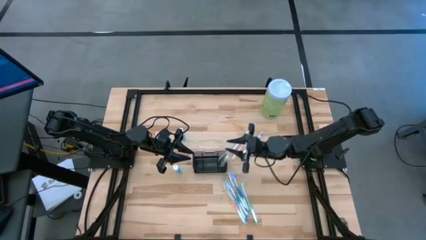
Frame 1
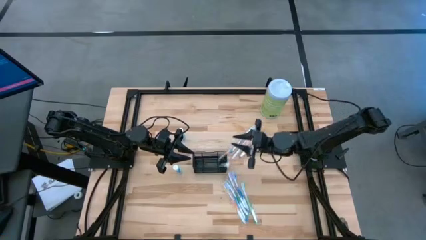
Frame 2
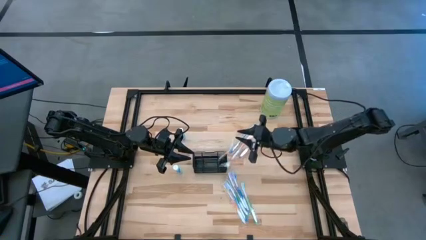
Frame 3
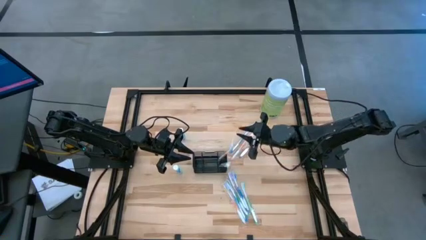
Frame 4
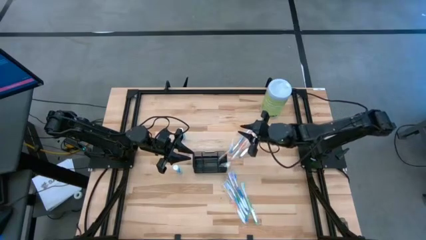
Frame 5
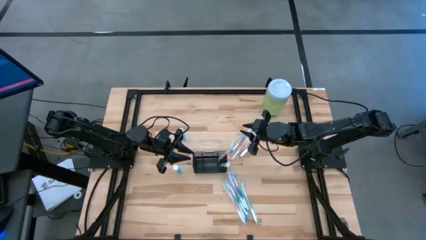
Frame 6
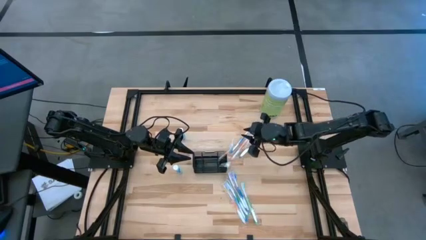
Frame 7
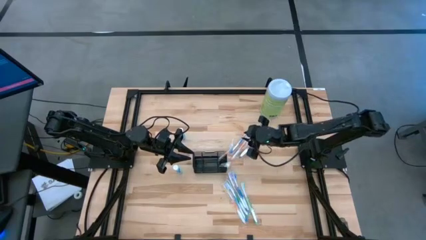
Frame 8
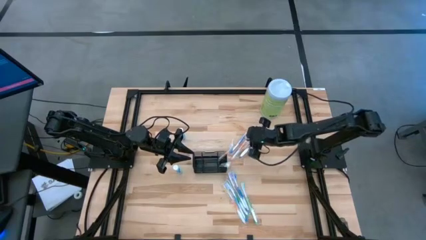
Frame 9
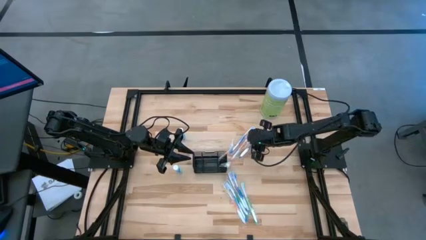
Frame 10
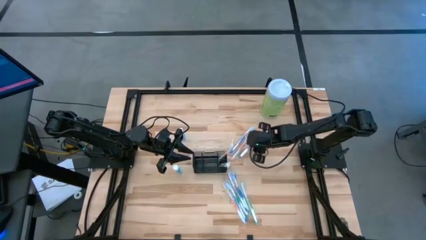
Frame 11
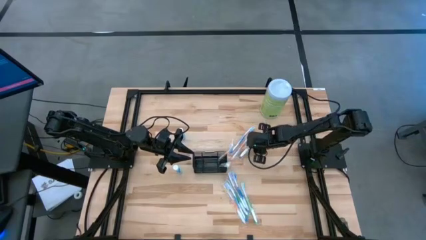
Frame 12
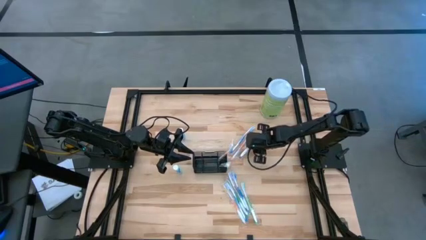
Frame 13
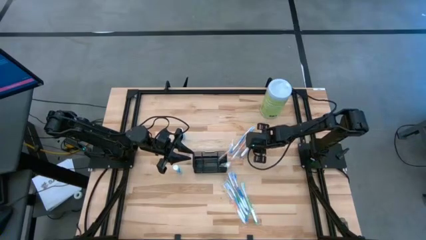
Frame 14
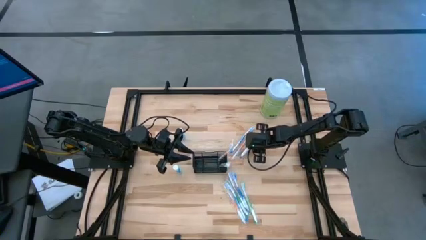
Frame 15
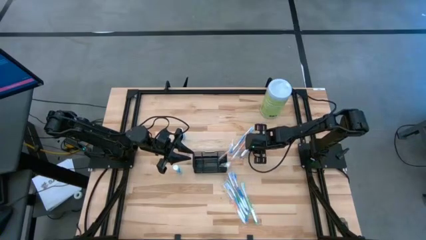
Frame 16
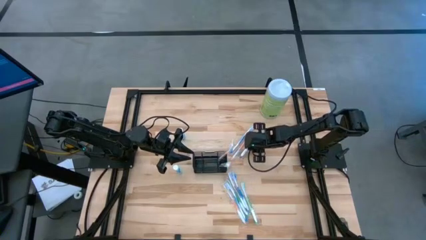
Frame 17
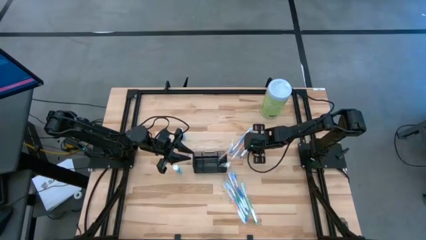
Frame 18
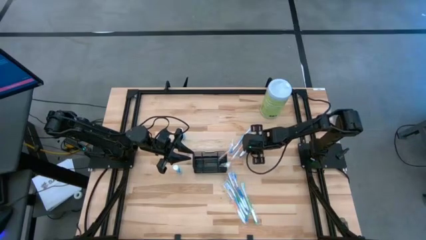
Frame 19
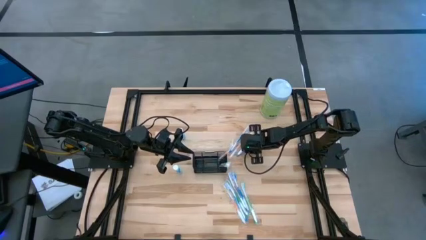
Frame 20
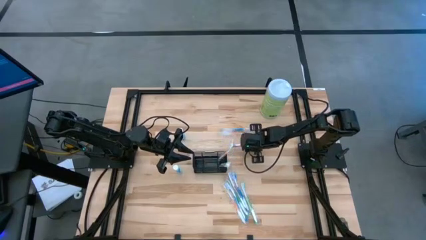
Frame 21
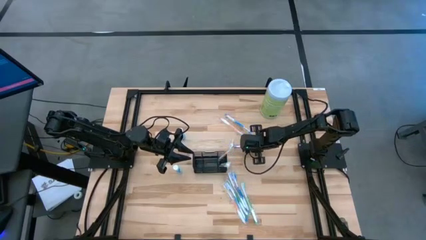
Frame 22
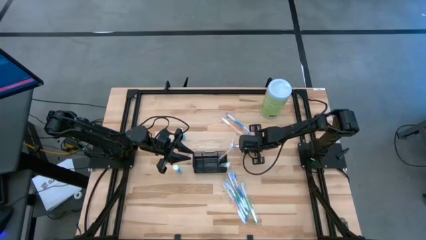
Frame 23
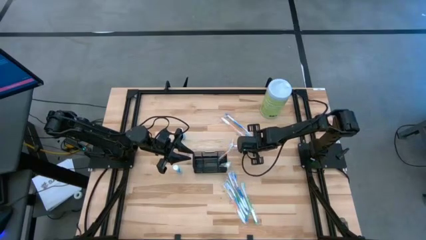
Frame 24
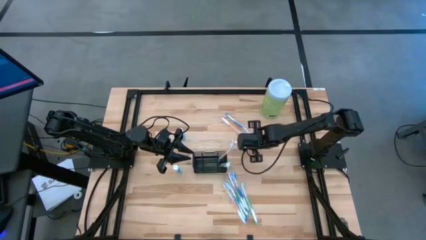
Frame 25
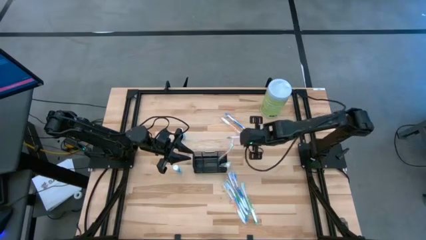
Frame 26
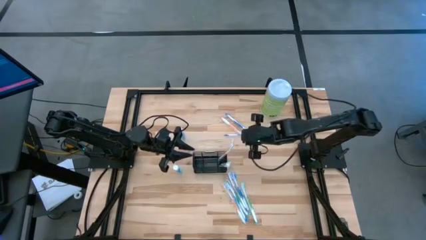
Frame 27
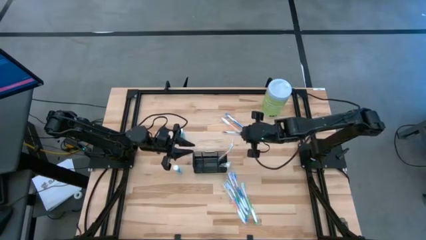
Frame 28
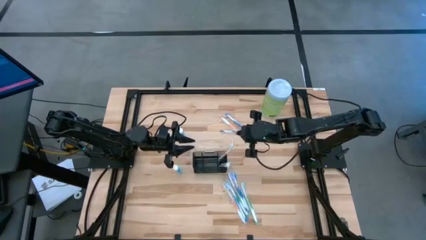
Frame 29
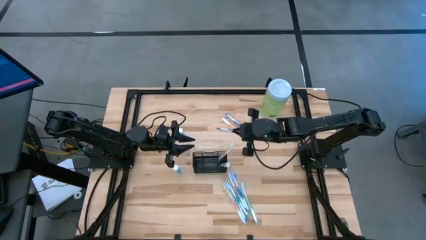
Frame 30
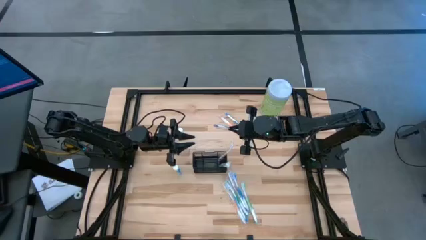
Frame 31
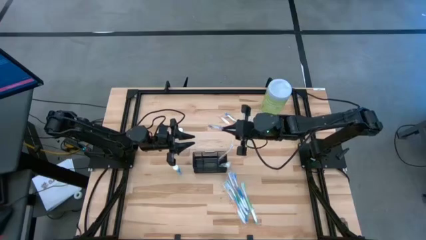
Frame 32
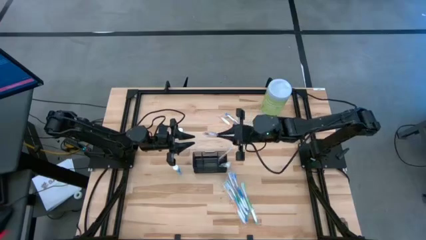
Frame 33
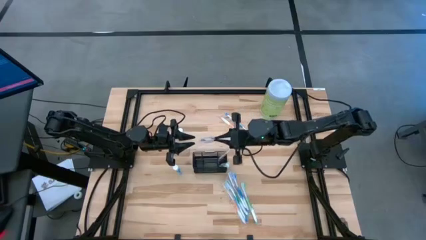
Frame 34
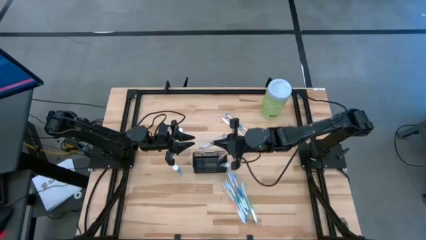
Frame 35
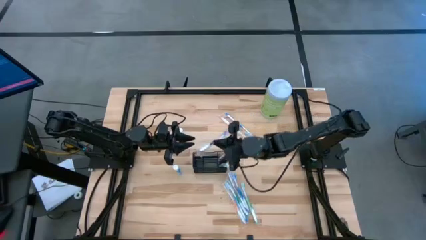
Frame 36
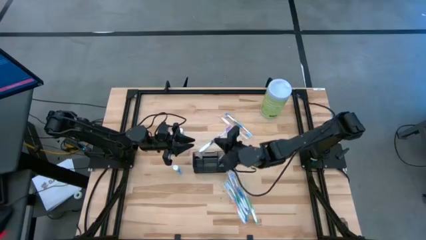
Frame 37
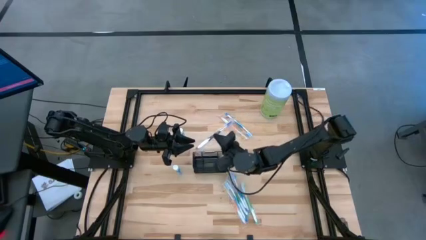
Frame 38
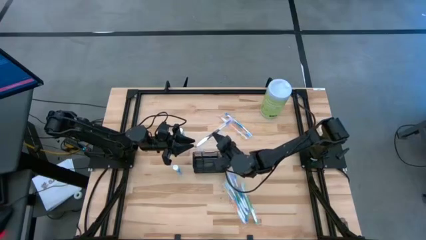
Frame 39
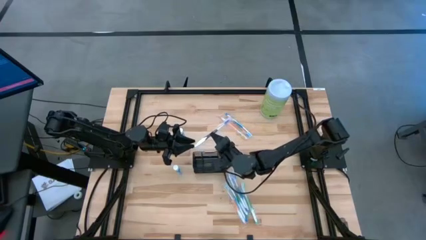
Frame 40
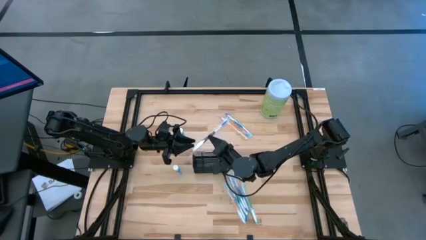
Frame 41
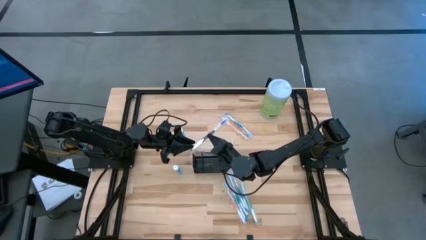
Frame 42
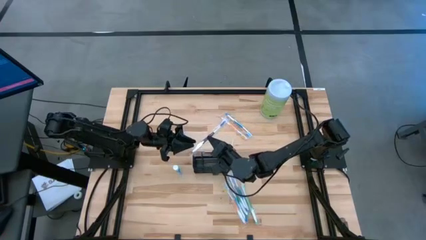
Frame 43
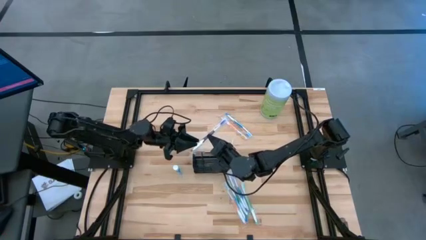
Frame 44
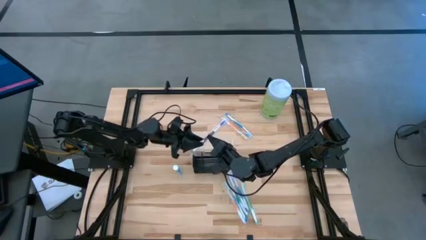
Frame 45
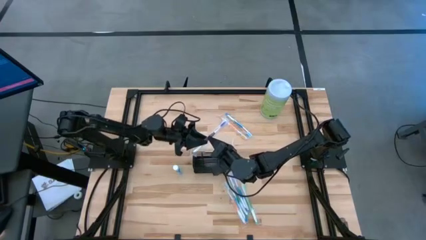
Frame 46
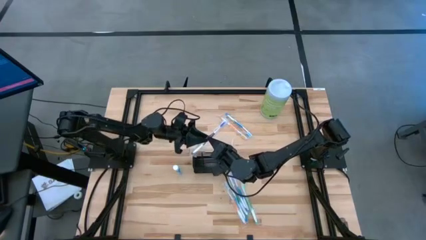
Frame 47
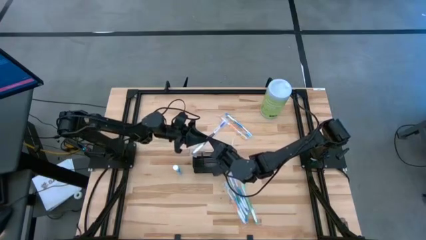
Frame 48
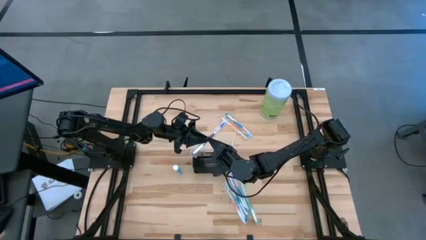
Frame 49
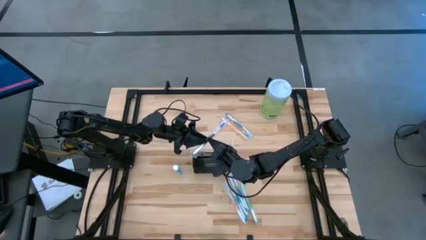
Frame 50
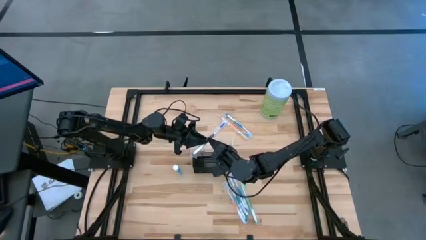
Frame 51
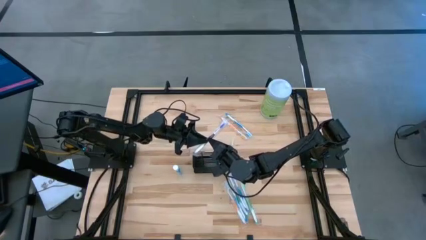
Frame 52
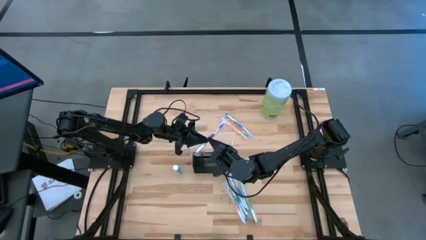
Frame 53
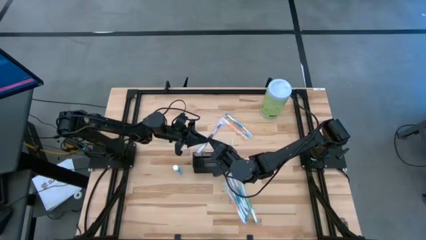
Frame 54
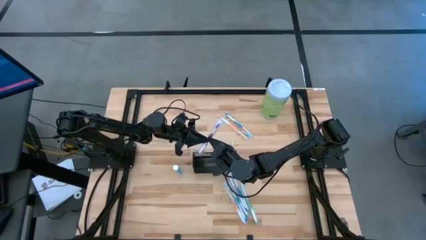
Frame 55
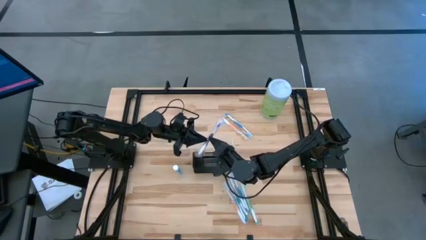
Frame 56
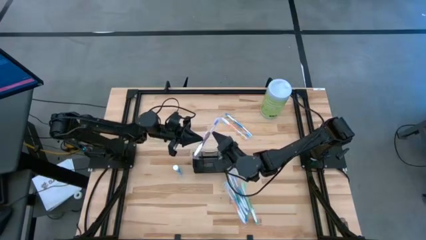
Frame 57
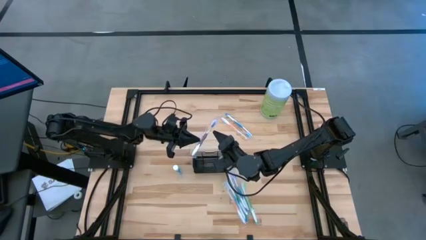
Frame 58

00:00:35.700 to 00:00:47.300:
Task: Pick & Place toothbrushing station
Put the purple toothbrush into the mesh

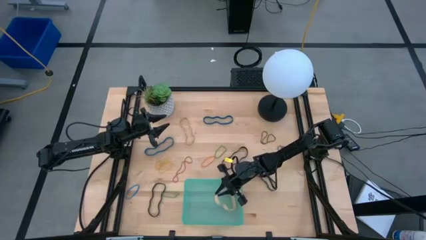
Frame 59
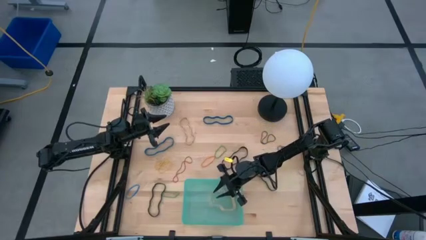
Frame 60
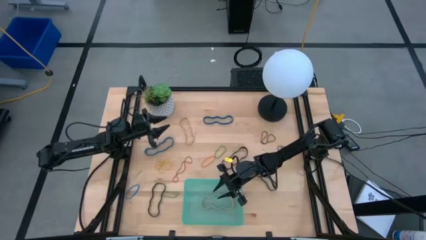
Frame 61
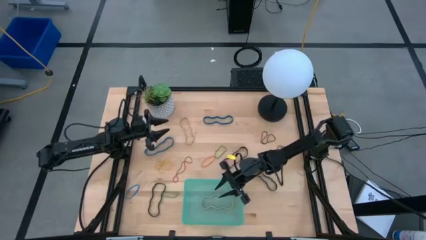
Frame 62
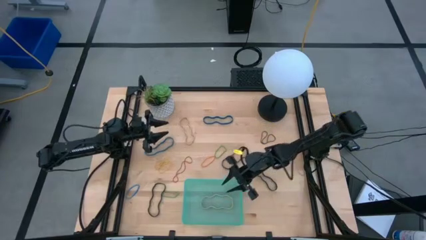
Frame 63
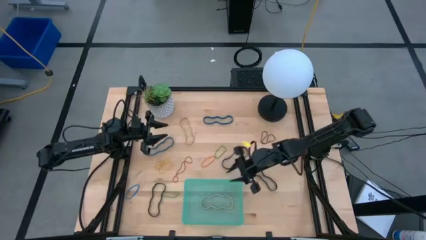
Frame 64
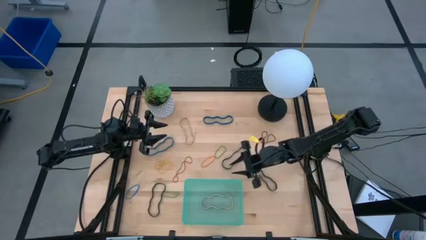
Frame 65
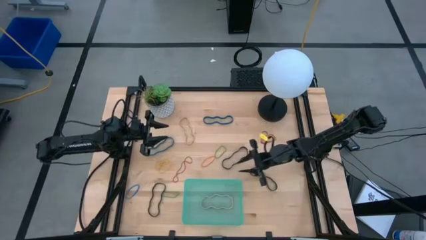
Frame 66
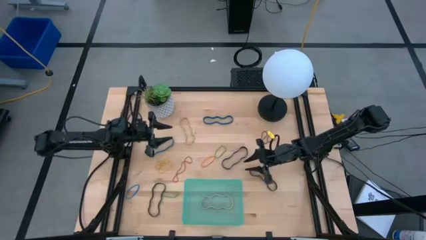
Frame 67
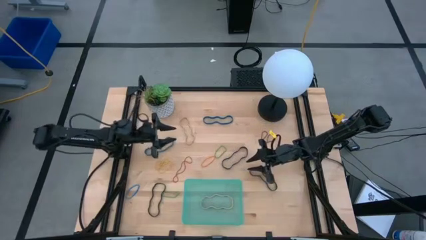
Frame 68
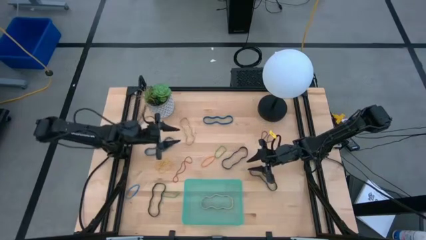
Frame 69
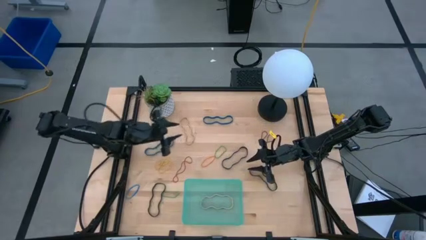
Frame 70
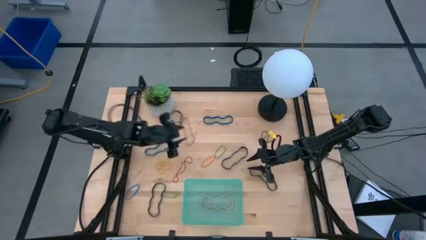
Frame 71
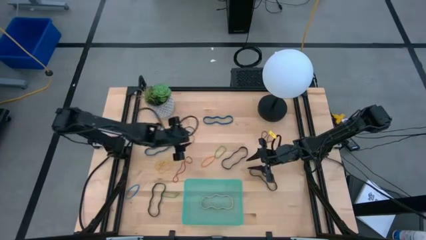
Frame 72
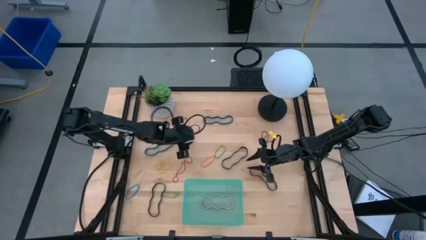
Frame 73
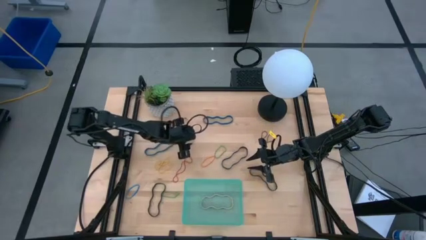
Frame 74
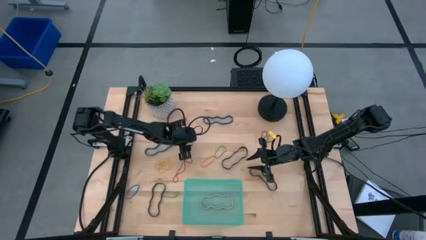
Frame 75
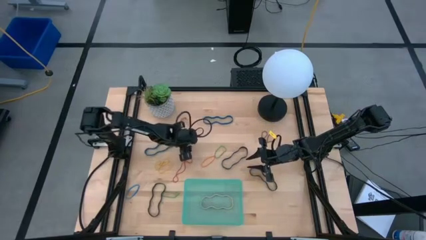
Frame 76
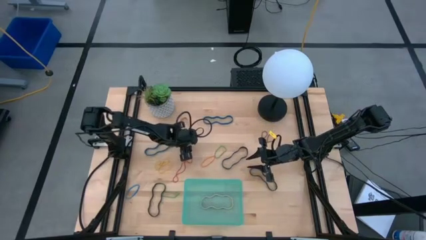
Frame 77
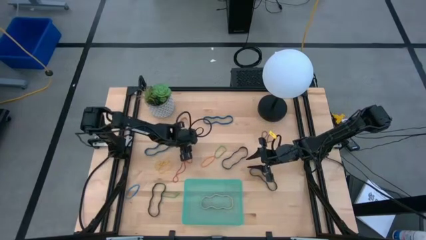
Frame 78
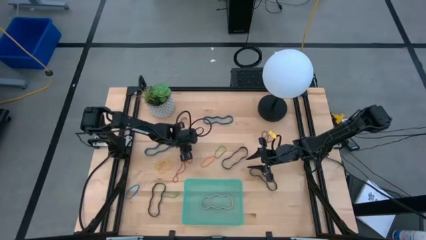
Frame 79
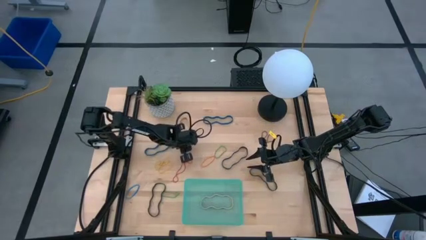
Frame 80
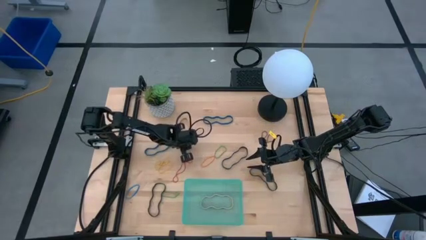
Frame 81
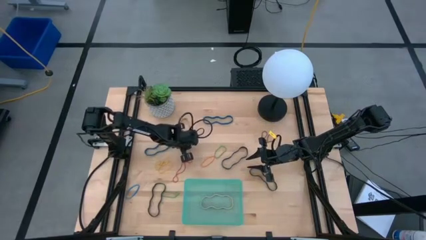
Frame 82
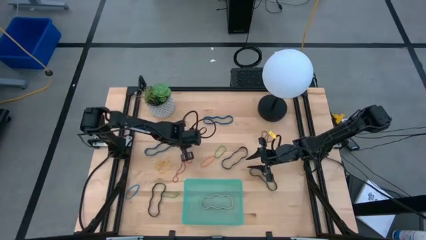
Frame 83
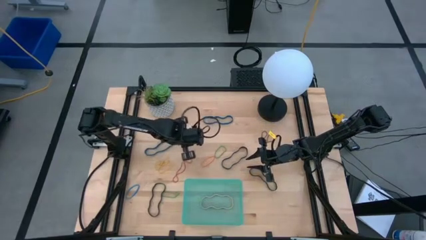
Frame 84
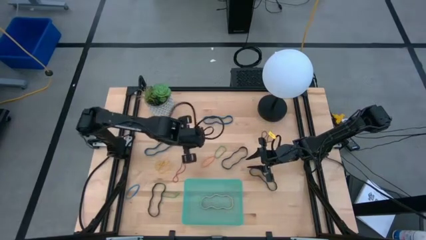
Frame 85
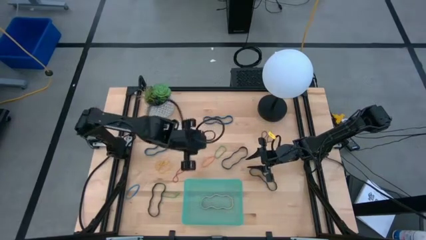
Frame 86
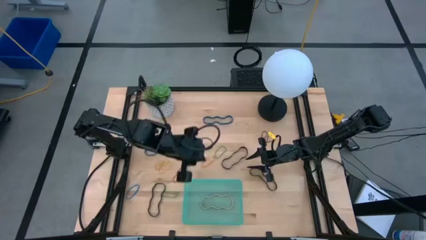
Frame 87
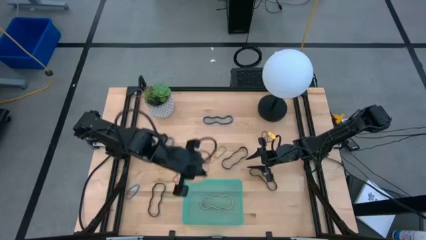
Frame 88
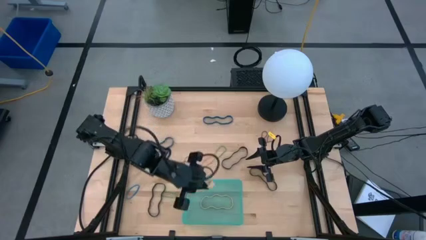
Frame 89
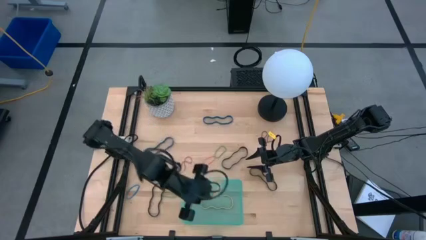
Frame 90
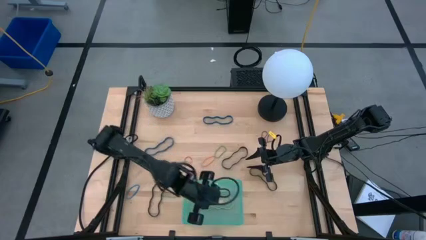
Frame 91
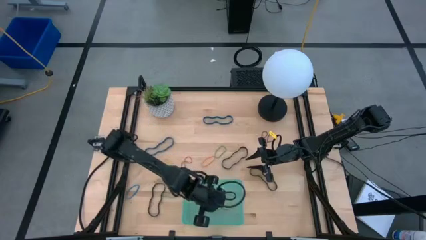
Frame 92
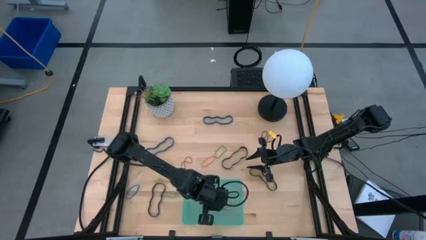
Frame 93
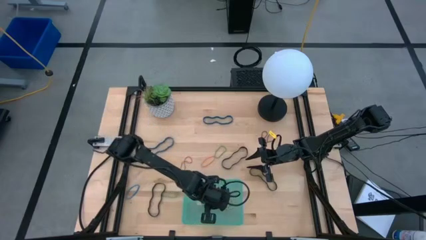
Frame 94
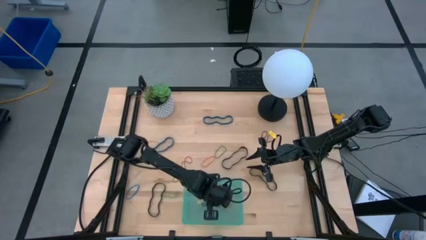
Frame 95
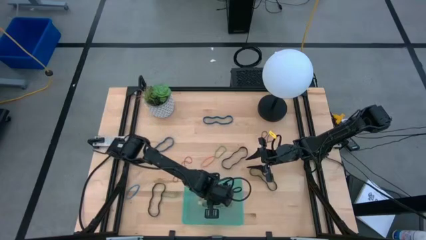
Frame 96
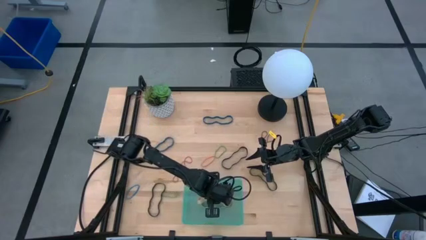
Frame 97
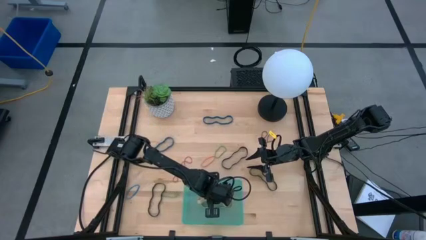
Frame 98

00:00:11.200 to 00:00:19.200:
Task: Pick and place rubber bands into bin
Put the brown large rubberband into the green bin
